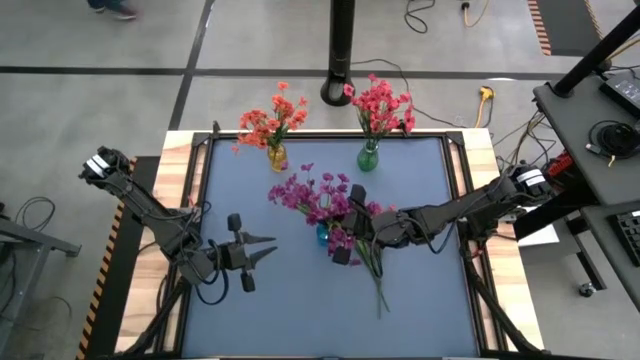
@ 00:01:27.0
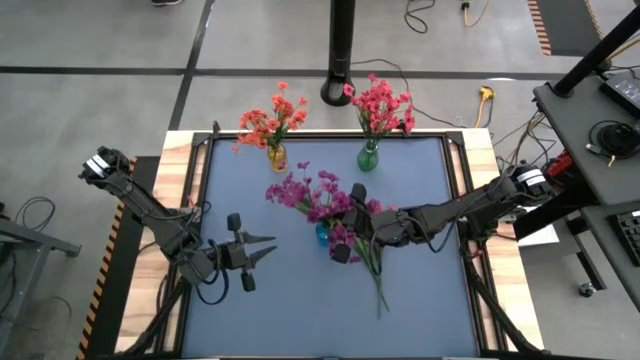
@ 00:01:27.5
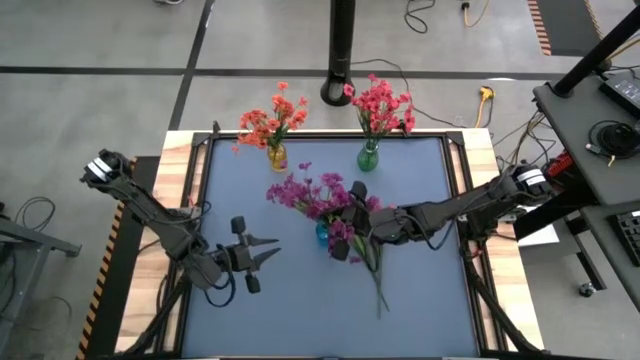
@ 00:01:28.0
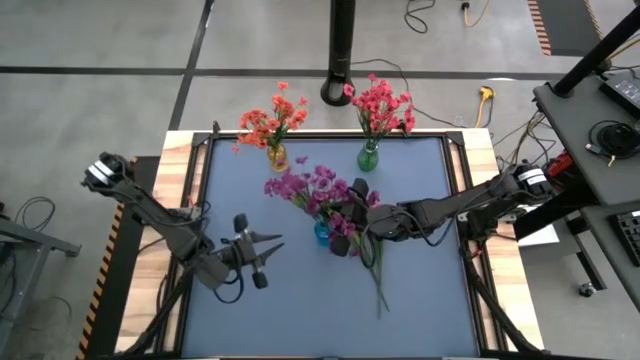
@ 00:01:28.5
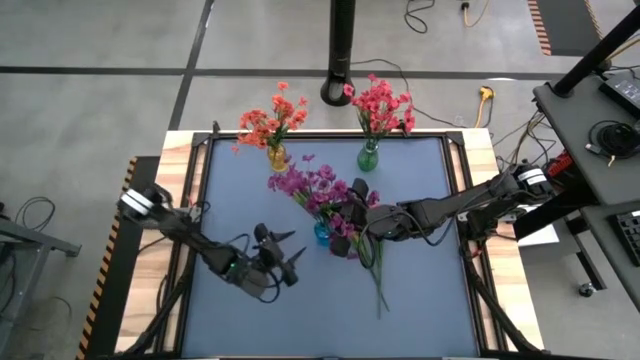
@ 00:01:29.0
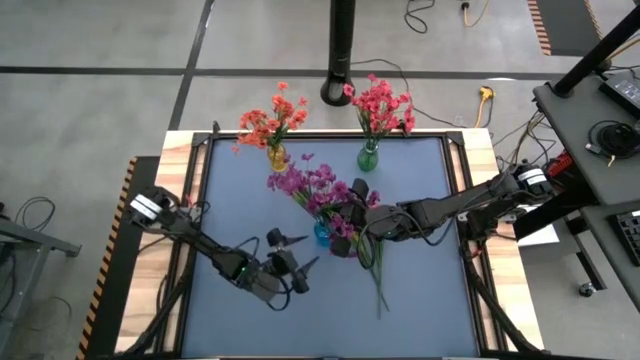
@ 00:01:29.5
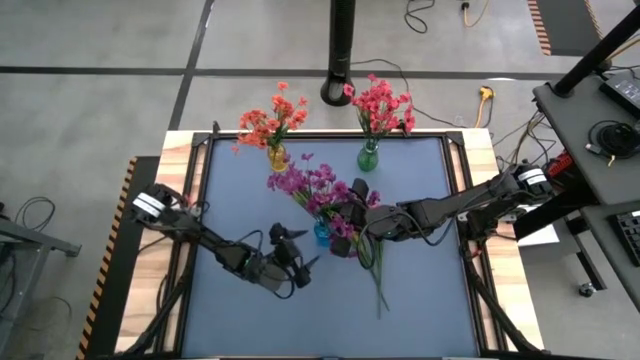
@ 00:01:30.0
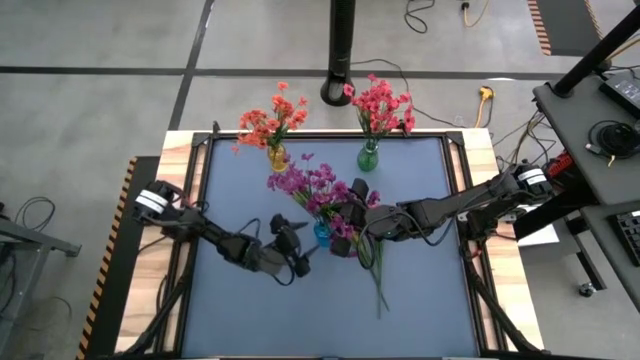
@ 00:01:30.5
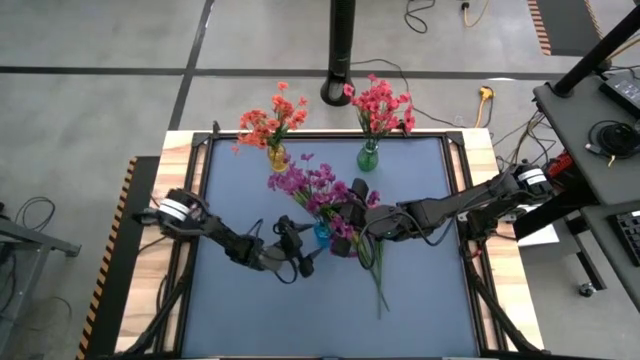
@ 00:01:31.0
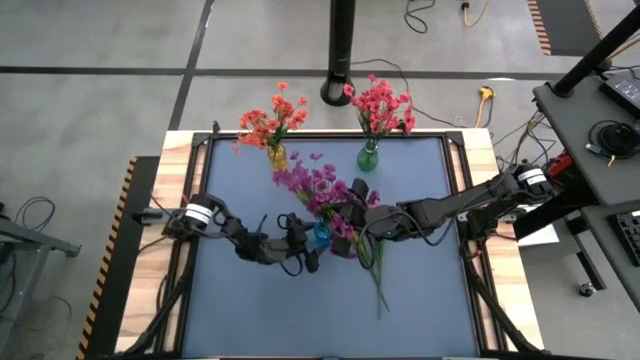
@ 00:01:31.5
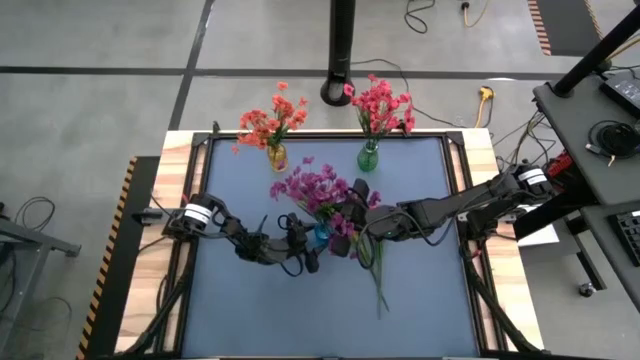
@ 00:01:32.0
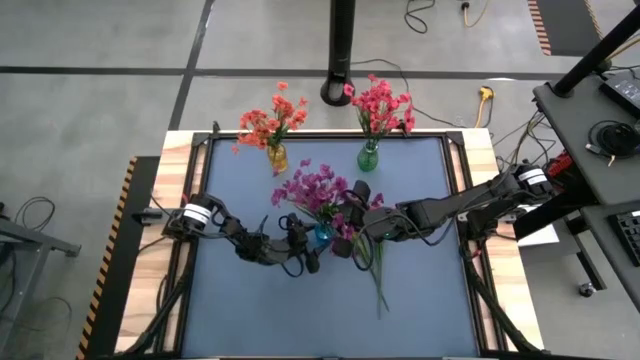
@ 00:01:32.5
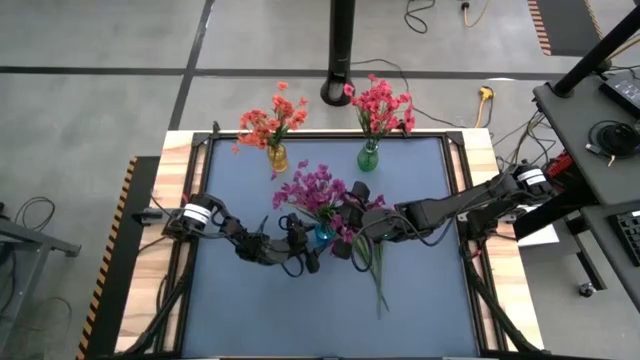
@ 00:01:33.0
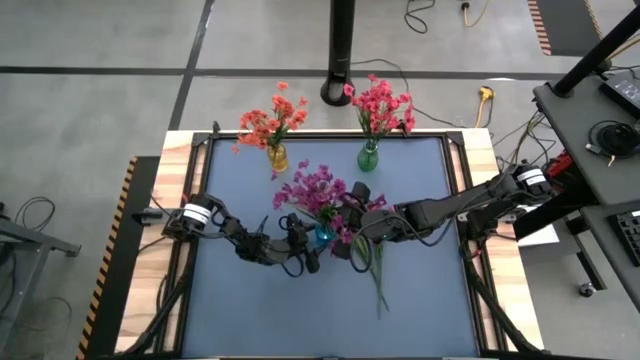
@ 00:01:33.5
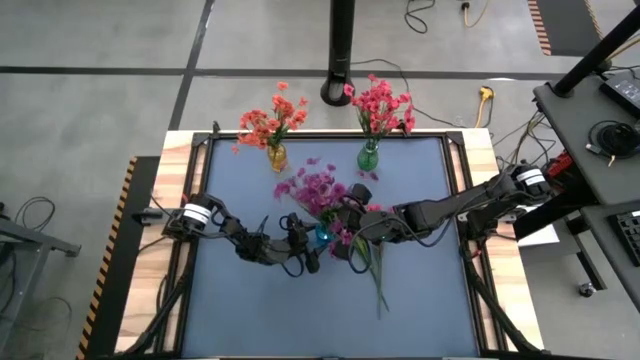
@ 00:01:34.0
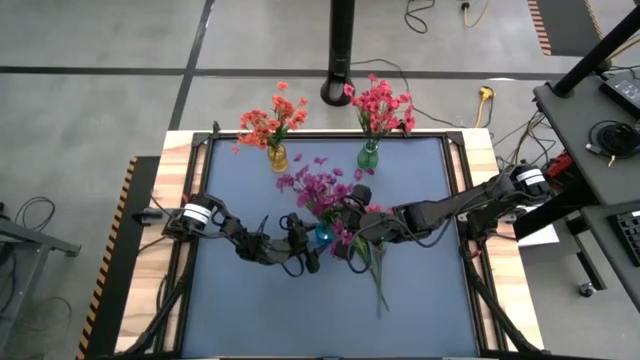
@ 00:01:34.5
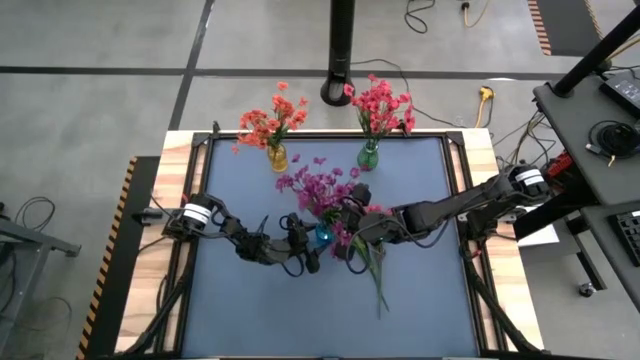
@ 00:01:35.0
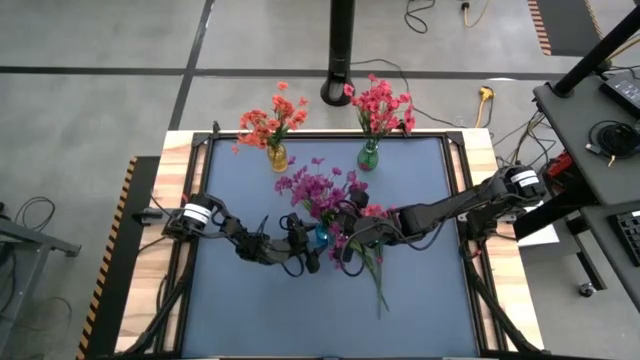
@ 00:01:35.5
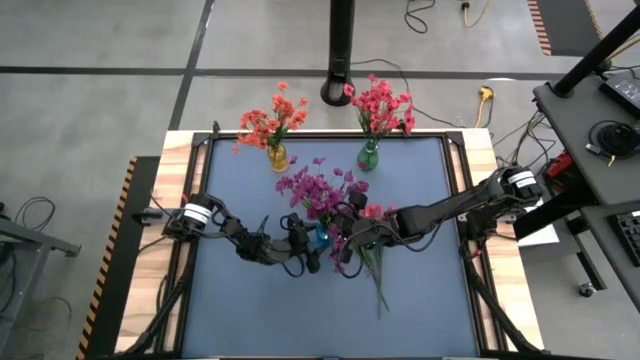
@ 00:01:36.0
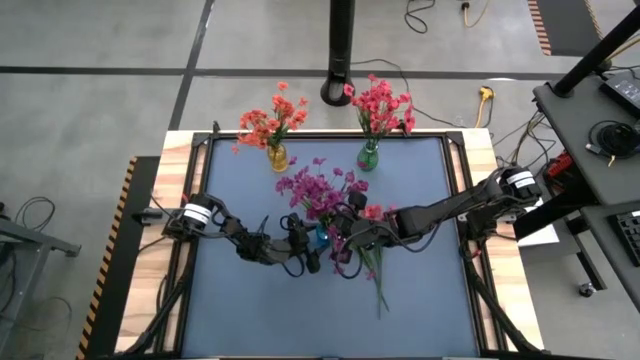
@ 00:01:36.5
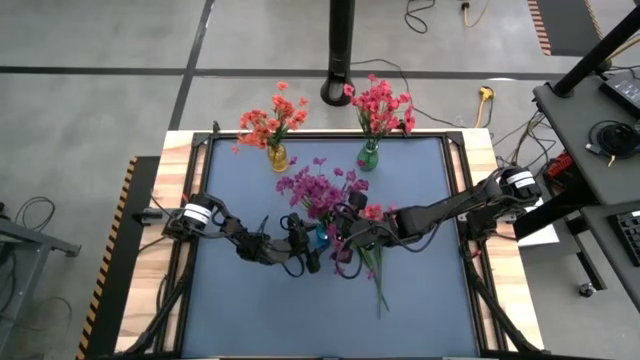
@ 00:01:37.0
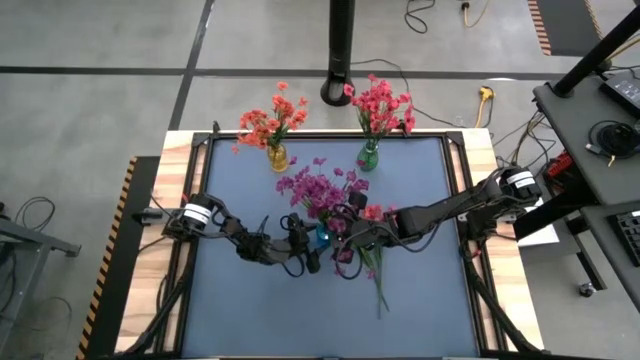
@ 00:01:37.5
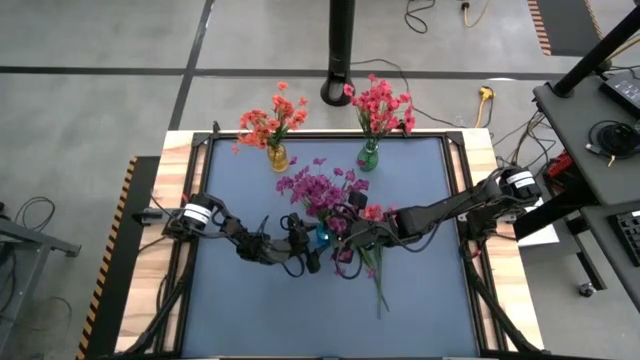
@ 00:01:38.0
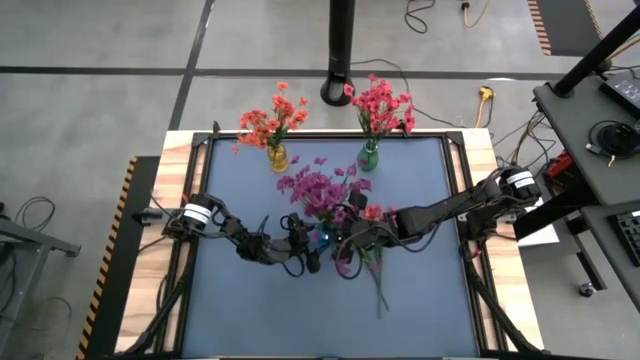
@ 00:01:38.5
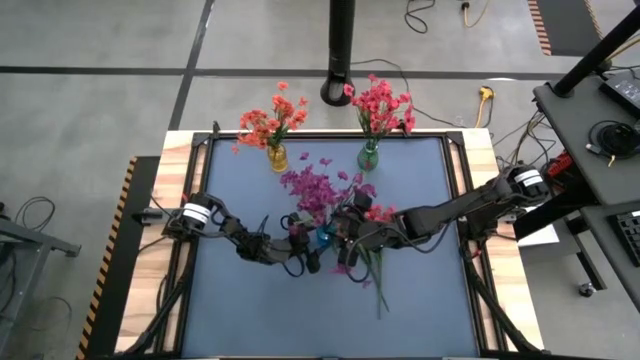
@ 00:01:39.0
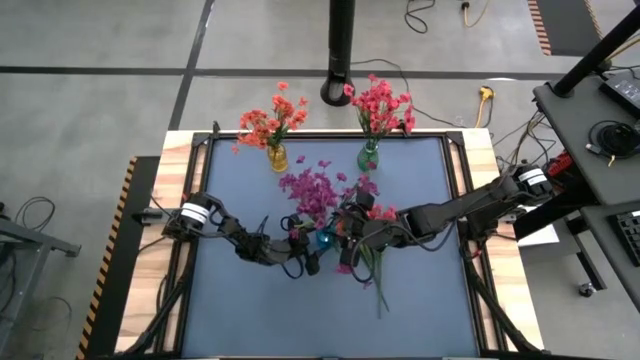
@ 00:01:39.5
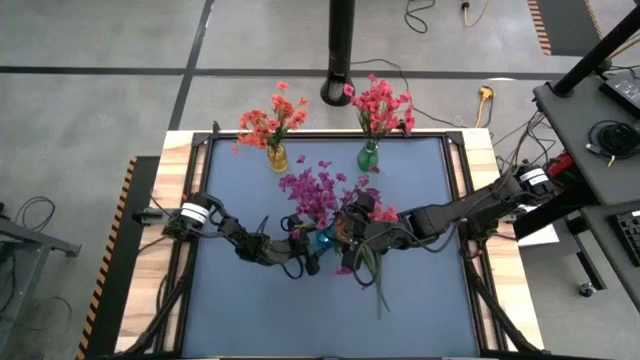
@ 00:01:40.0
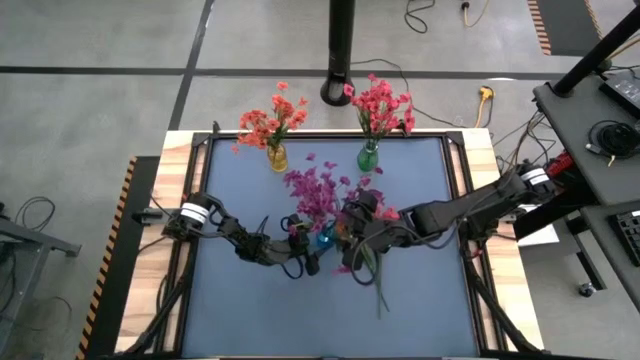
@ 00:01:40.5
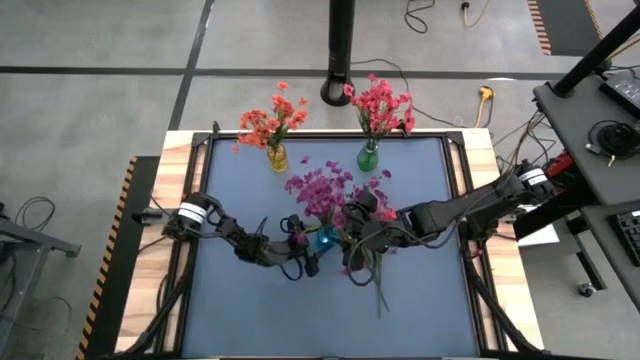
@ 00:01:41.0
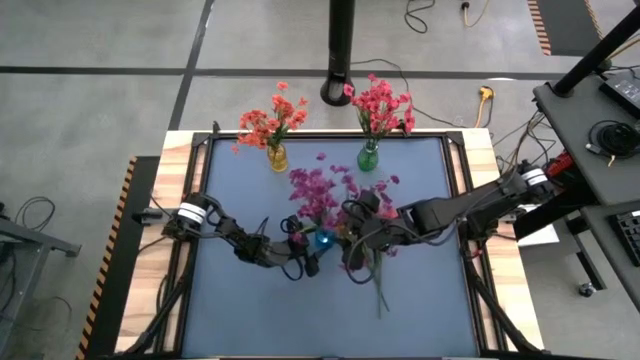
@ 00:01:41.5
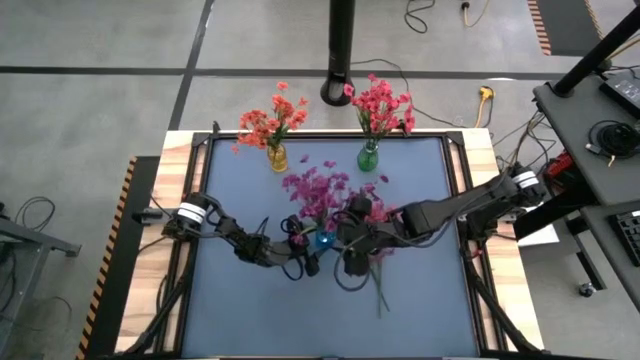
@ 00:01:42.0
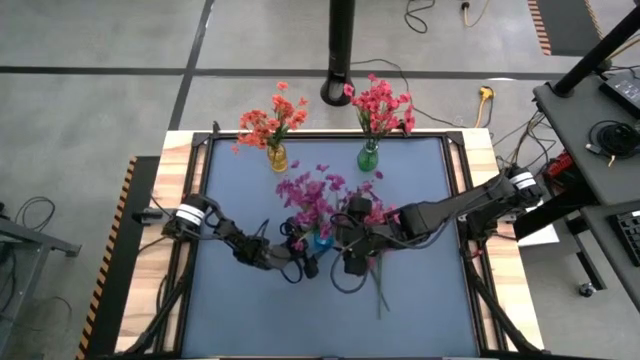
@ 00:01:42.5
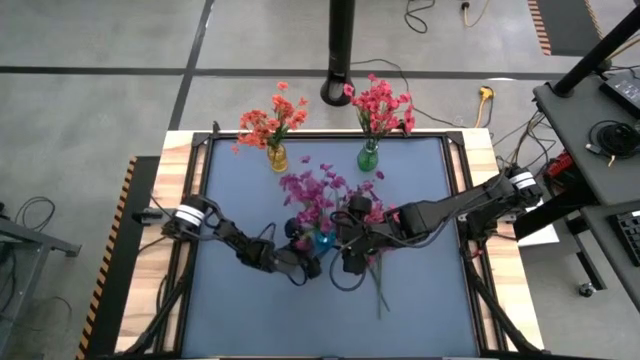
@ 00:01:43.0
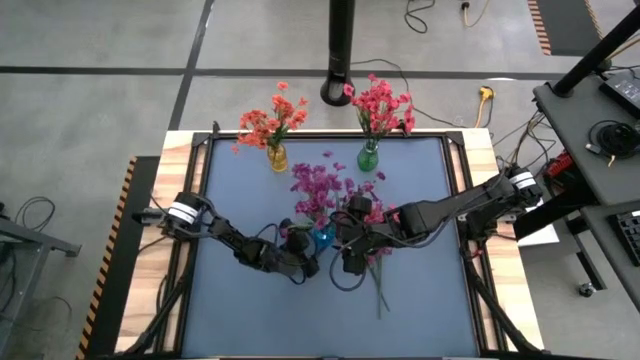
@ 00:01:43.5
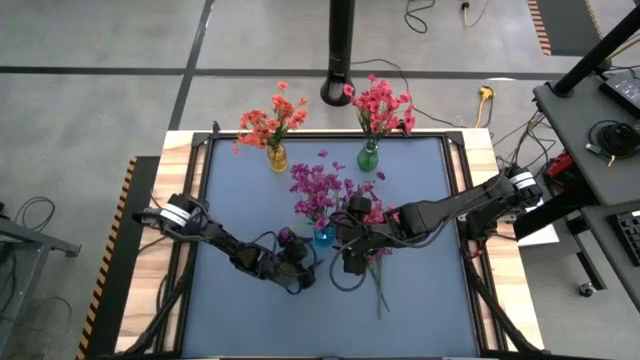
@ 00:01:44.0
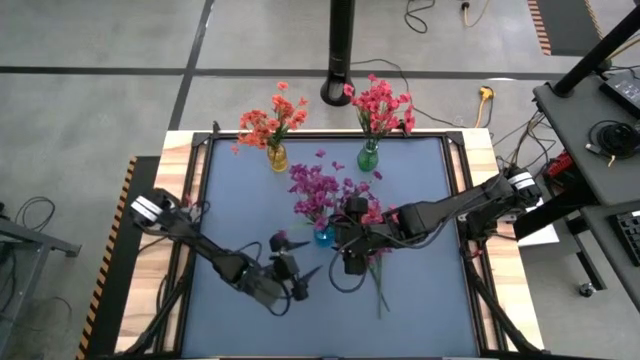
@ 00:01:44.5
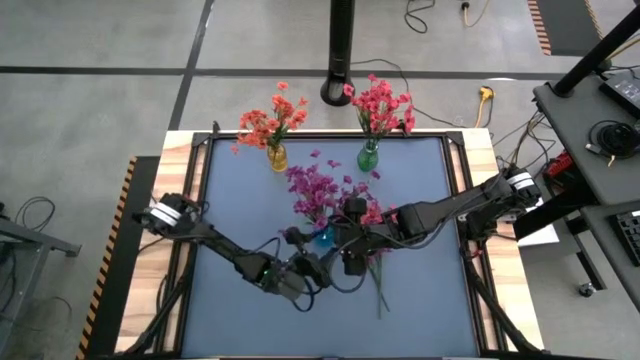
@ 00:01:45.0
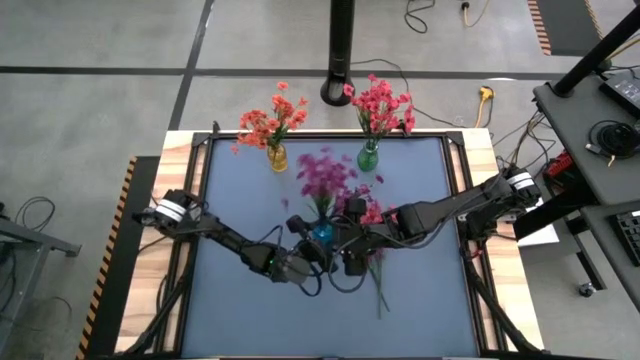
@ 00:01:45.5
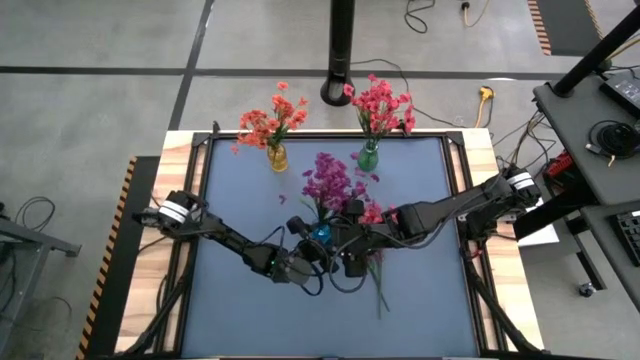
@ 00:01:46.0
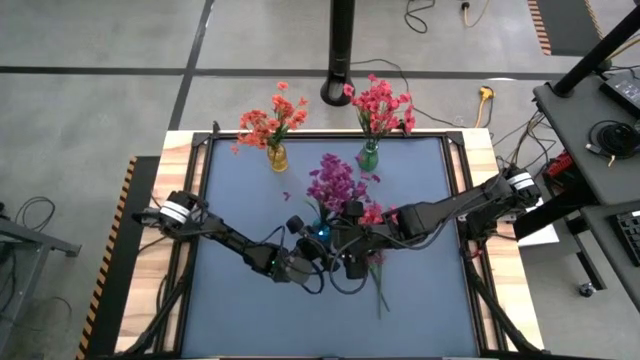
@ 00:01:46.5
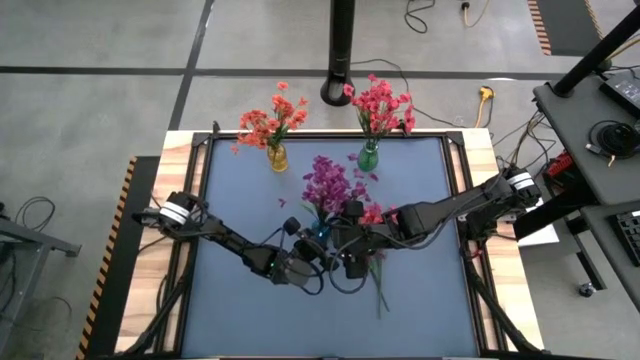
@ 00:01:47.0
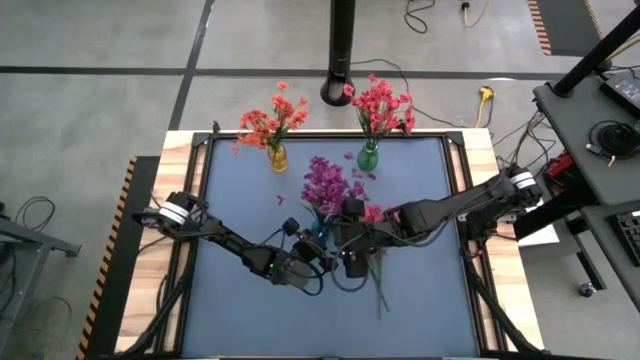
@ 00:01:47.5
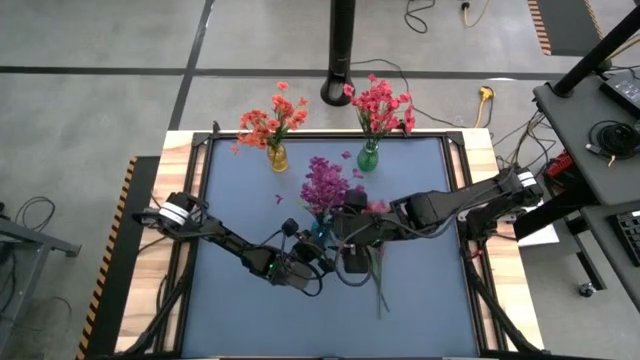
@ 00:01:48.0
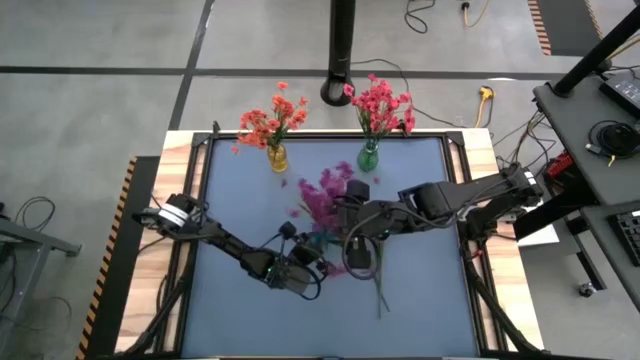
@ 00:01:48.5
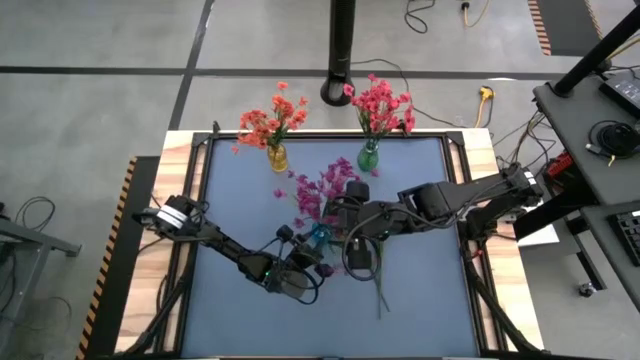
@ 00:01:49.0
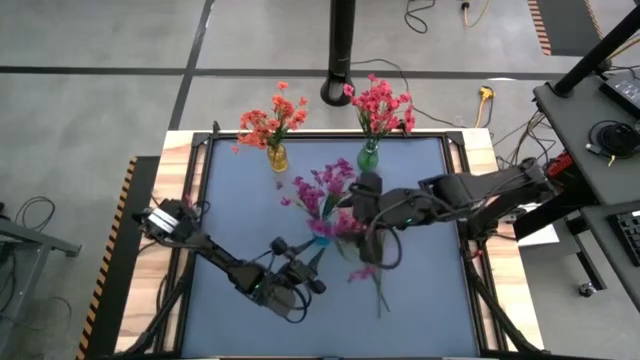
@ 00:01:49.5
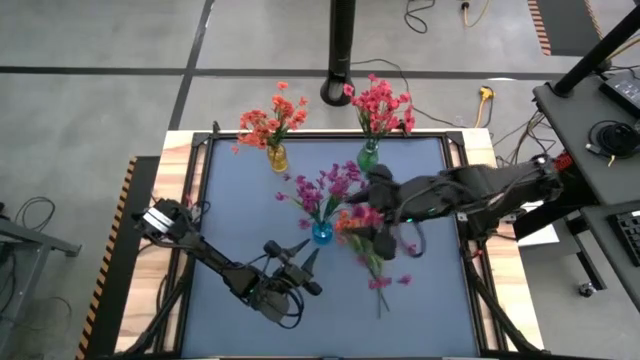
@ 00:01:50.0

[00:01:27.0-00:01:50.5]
Task: Sort flowers into vase by color
Put the violet flower into the blue vase
